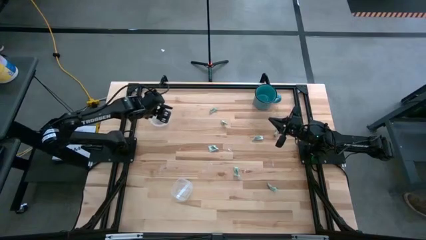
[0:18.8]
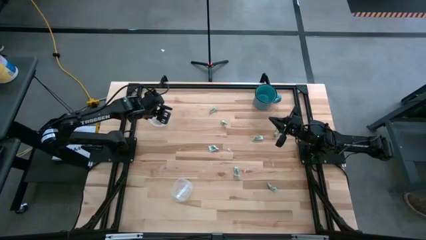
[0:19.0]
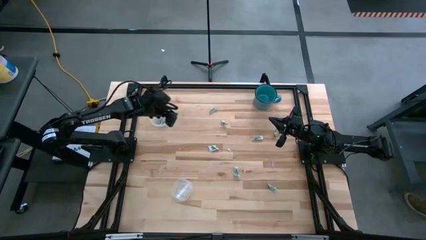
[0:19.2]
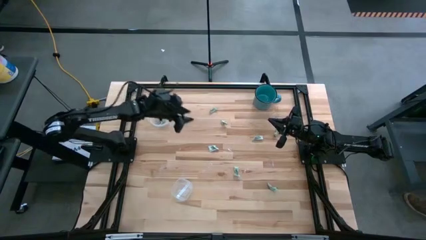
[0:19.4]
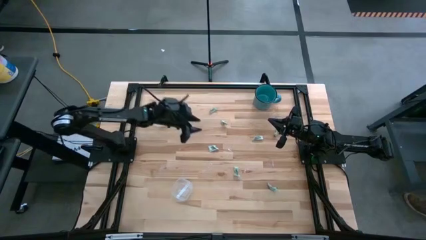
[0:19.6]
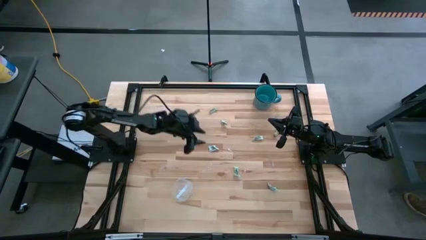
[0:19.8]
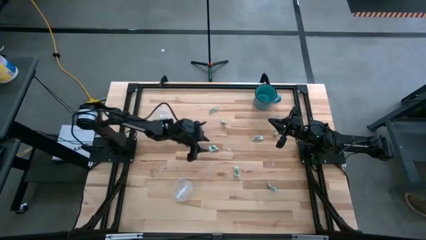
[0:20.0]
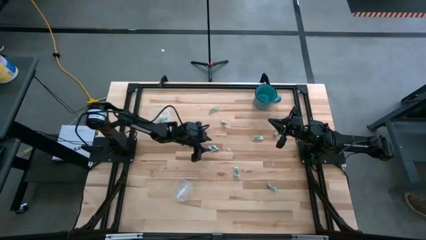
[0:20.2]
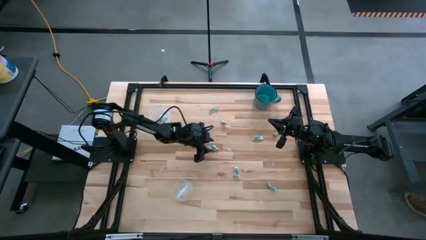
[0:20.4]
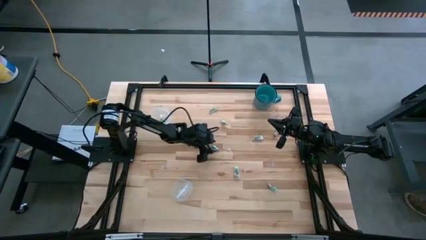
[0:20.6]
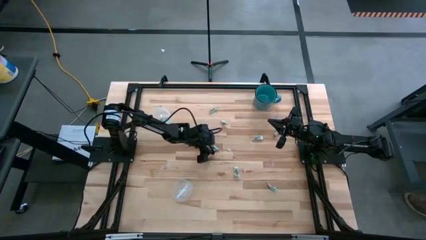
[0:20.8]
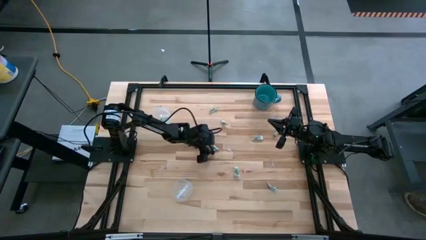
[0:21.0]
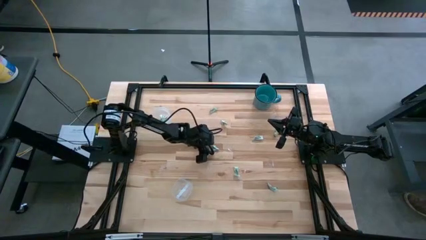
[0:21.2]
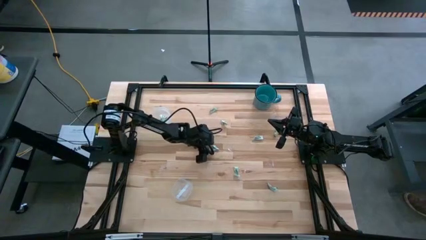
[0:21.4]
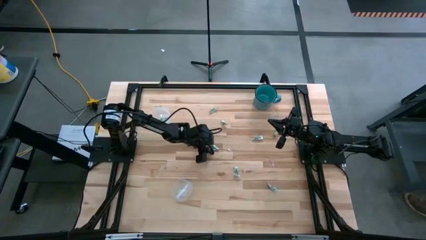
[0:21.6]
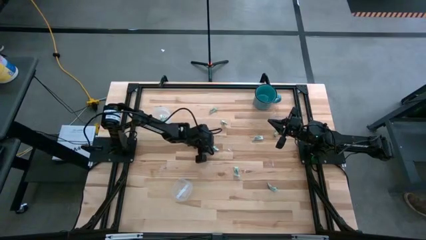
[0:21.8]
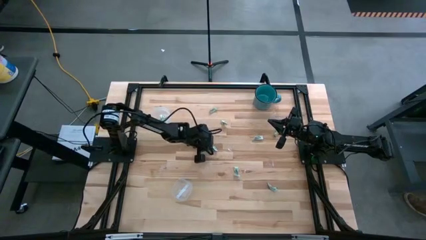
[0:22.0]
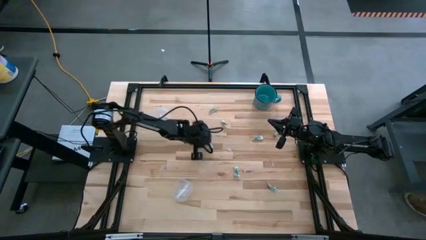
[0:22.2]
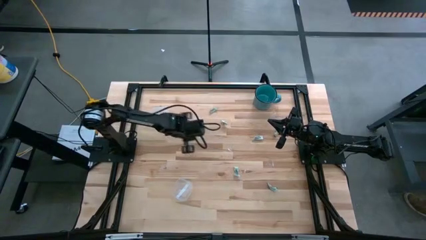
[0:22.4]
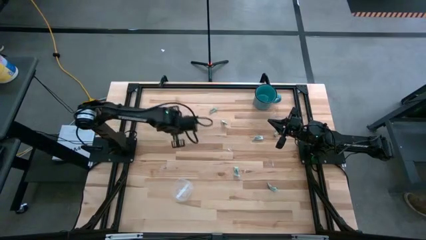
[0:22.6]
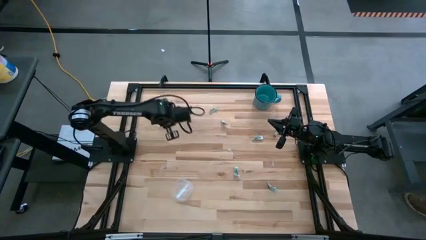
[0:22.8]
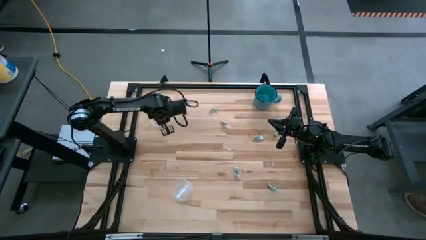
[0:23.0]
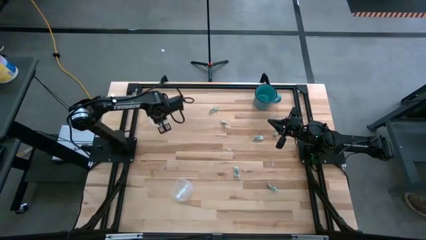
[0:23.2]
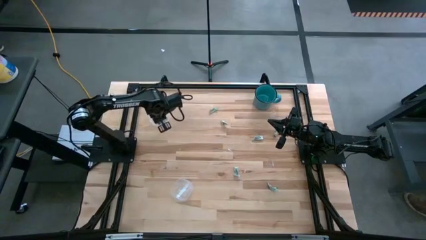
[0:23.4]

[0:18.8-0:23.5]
Task: Pick and place Stevia / Truvia into bins
Put the stevia packet into the top transparent container

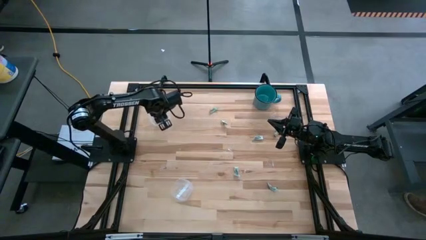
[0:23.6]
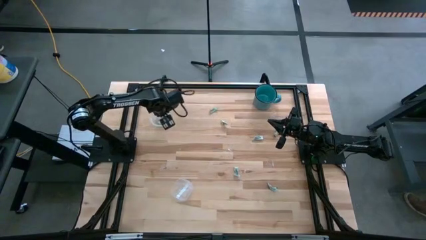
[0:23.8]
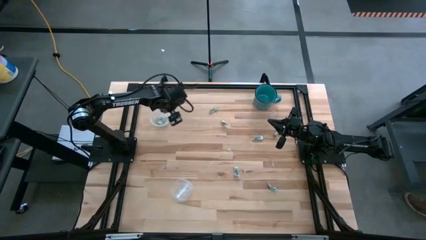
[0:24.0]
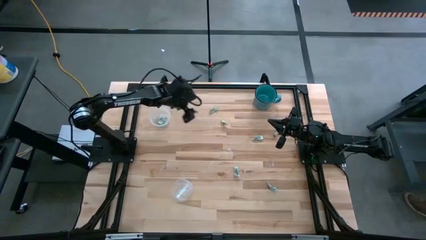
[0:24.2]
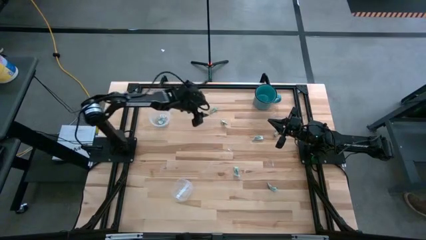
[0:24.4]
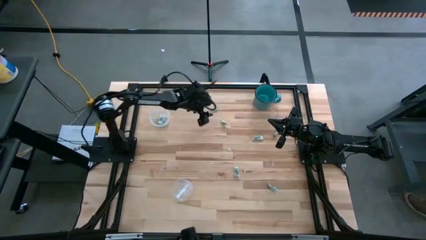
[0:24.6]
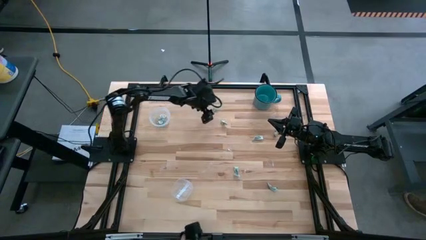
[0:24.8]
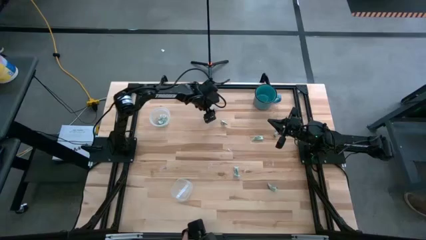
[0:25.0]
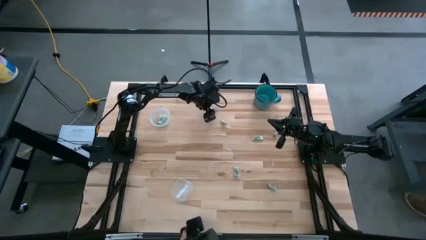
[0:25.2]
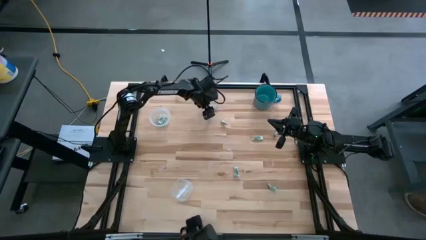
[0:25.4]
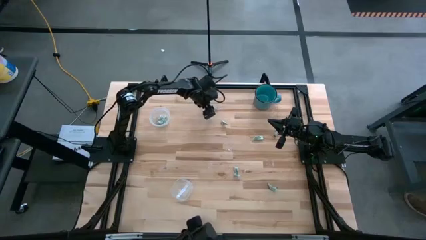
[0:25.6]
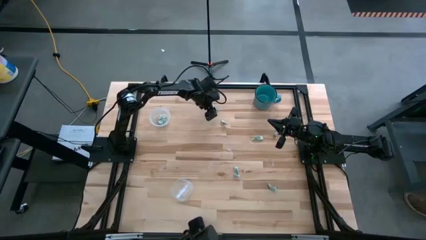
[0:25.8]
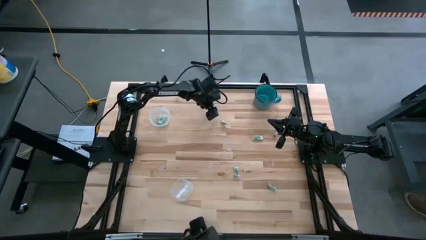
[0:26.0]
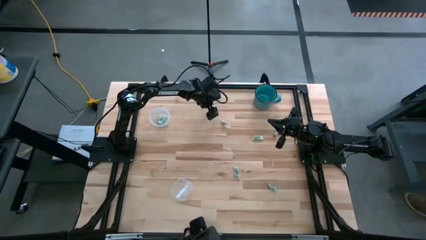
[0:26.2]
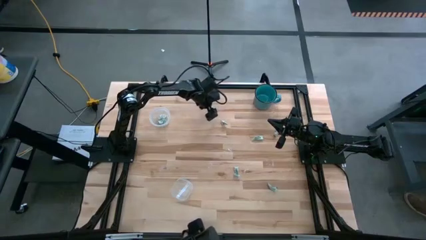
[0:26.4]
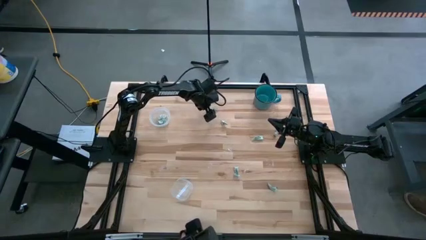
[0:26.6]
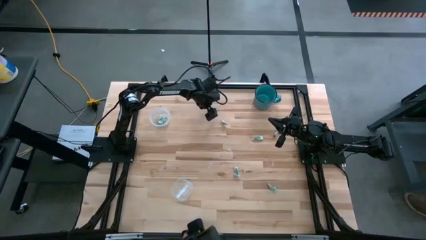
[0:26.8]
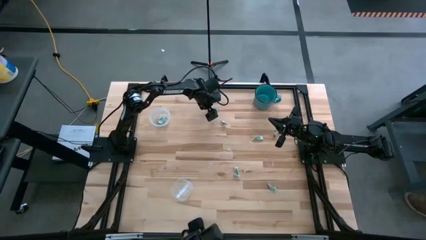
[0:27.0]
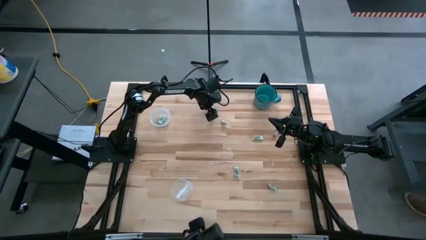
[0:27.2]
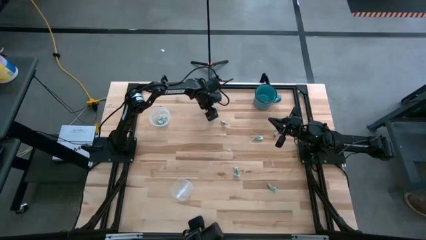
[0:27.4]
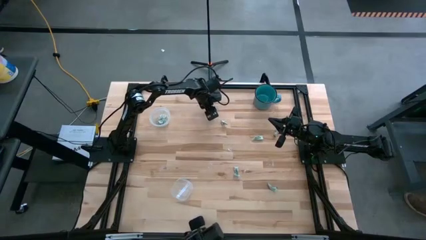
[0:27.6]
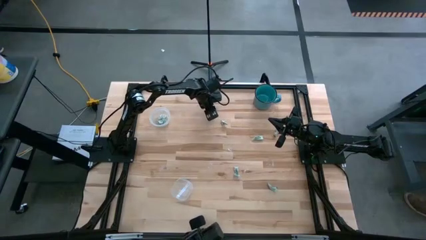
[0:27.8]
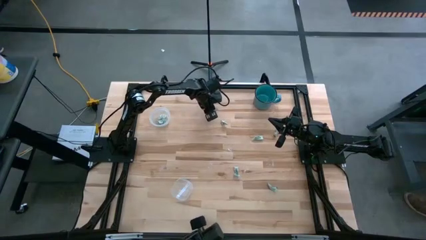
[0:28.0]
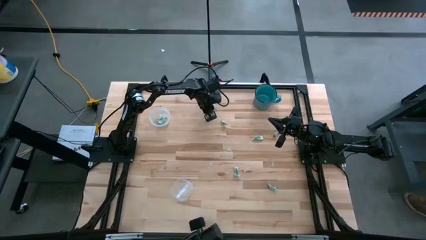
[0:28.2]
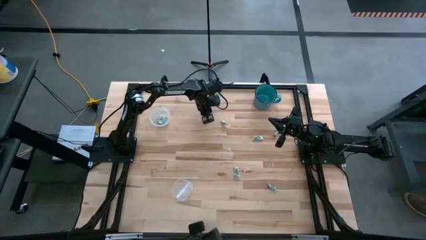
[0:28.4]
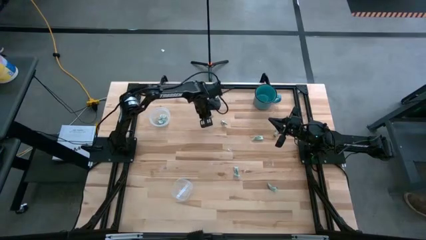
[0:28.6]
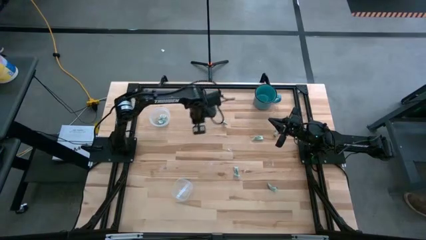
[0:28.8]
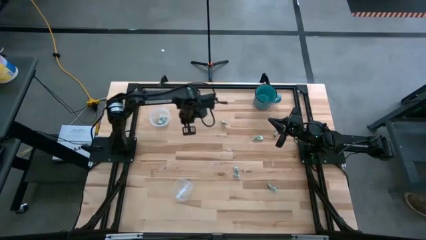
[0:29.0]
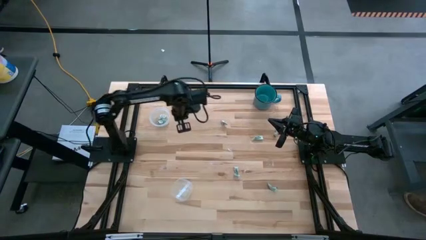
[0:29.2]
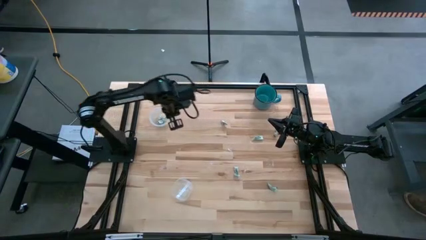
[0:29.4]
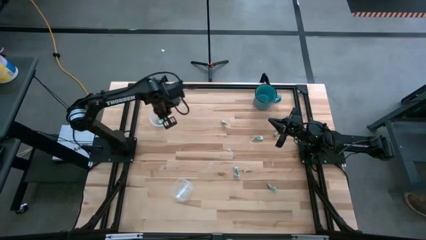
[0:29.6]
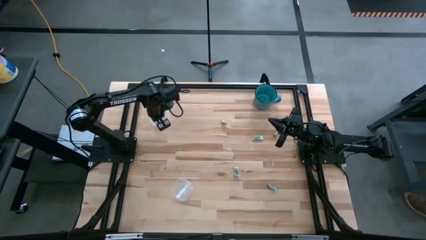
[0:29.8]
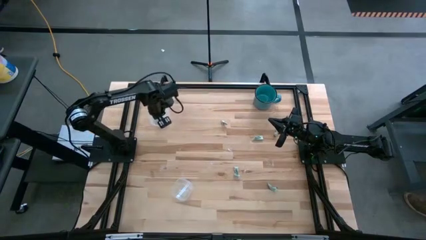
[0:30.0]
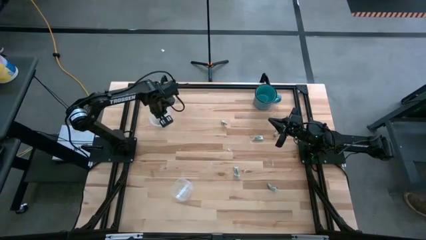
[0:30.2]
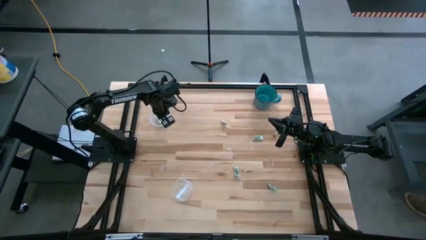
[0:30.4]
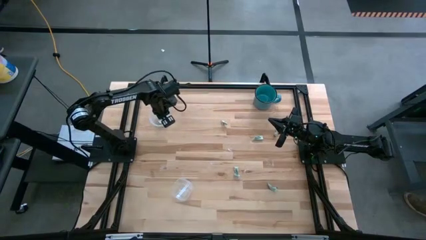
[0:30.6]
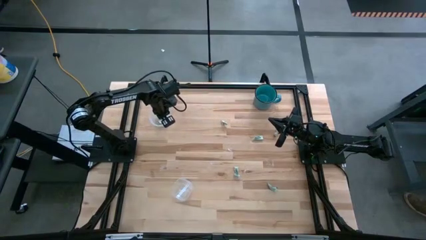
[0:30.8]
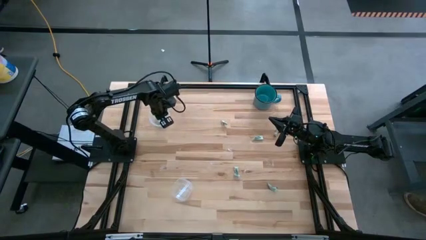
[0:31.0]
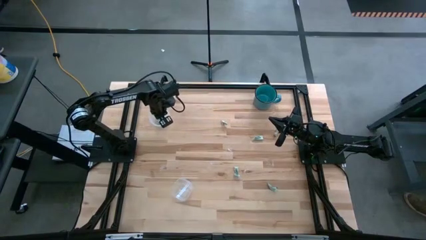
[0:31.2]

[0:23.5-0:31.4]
Put the stevia packet into the top transparent container

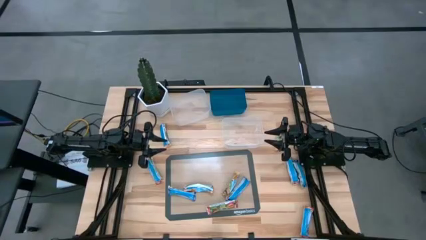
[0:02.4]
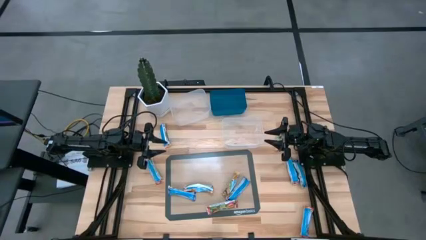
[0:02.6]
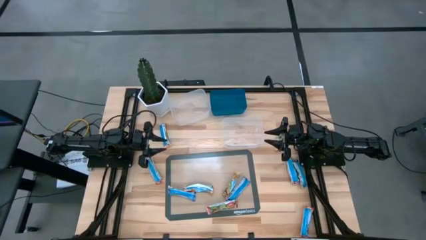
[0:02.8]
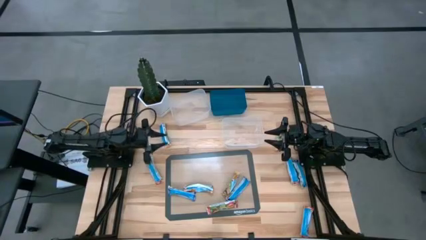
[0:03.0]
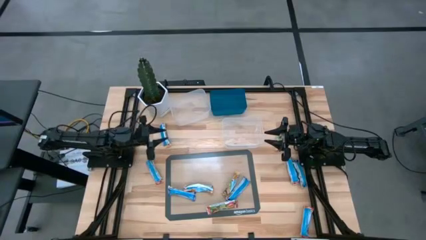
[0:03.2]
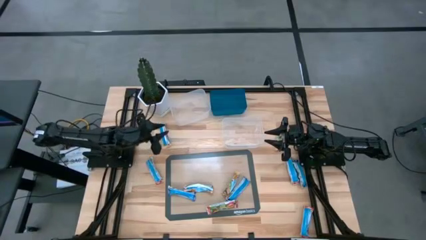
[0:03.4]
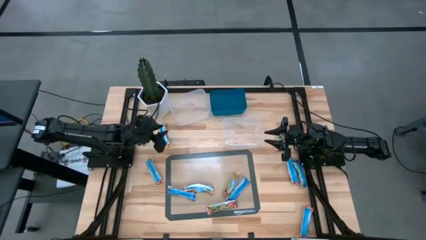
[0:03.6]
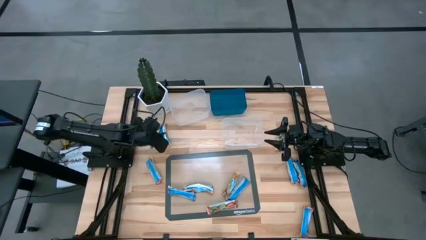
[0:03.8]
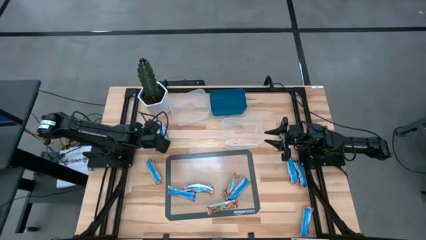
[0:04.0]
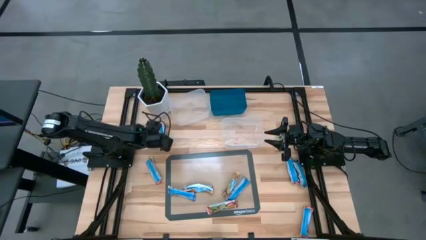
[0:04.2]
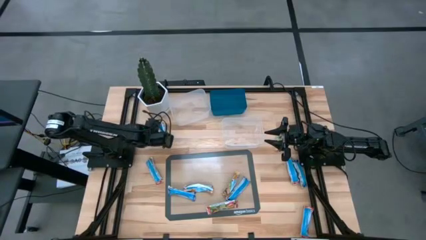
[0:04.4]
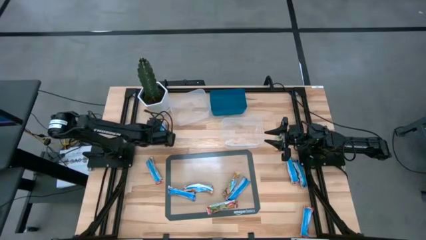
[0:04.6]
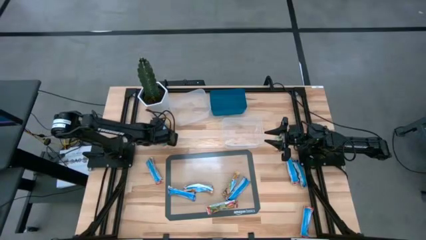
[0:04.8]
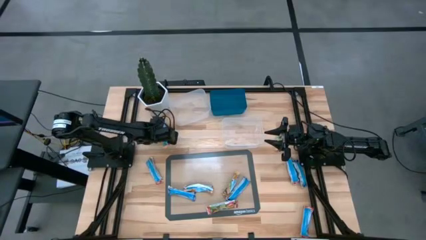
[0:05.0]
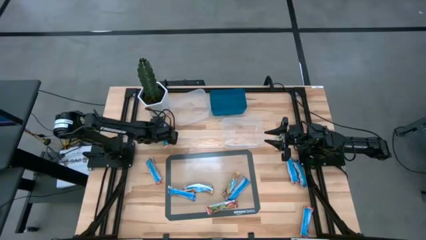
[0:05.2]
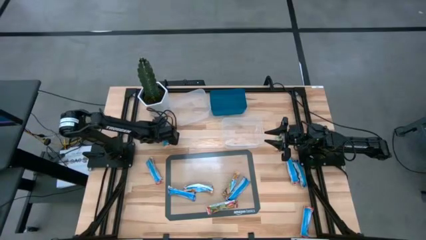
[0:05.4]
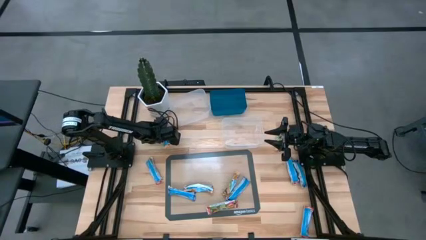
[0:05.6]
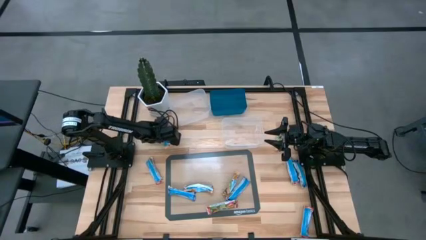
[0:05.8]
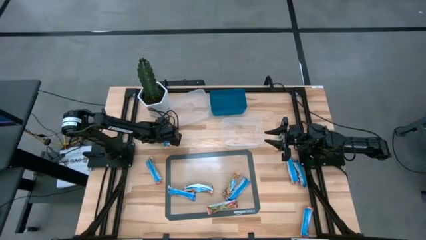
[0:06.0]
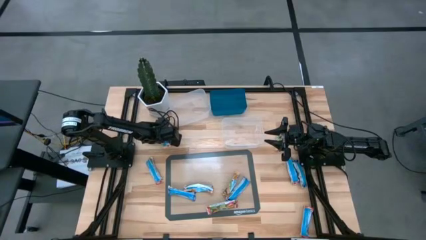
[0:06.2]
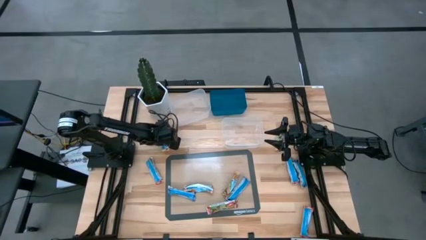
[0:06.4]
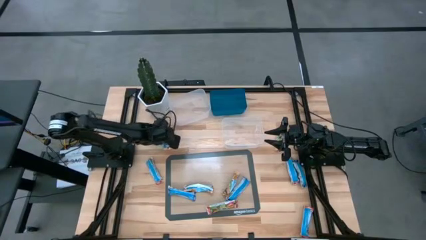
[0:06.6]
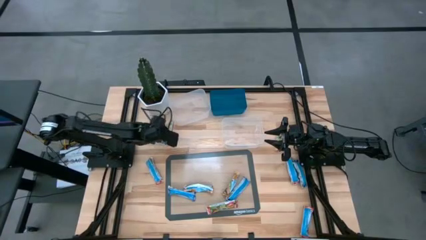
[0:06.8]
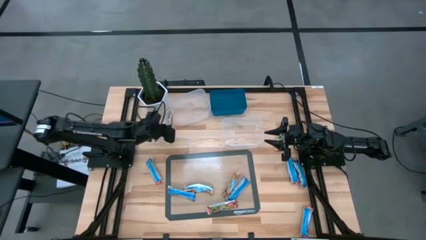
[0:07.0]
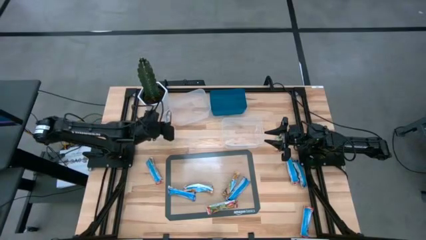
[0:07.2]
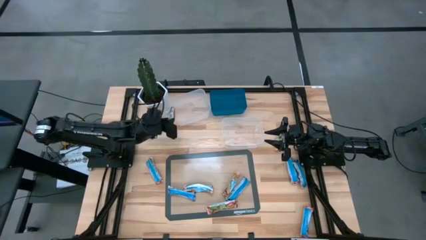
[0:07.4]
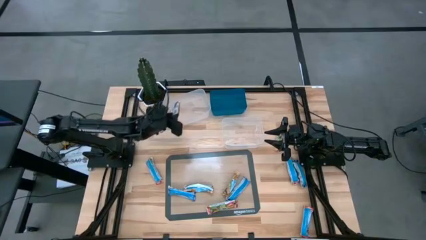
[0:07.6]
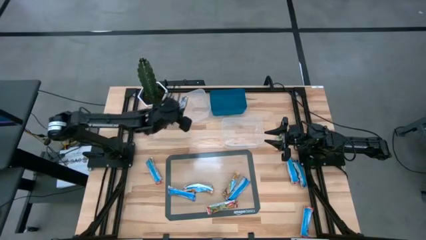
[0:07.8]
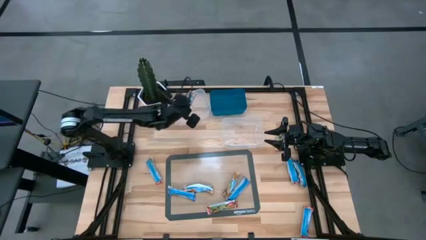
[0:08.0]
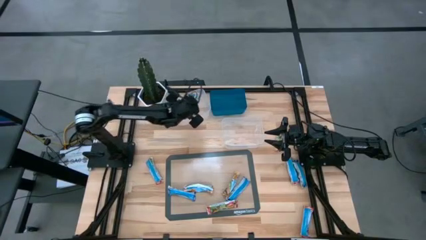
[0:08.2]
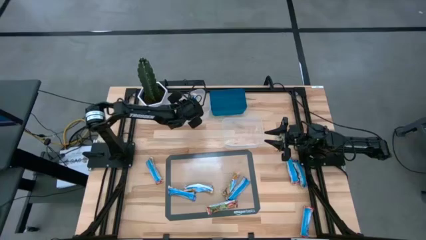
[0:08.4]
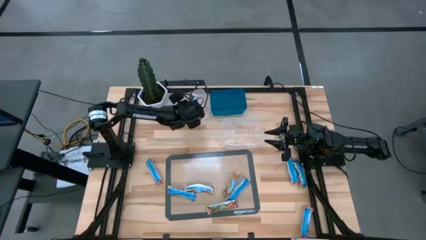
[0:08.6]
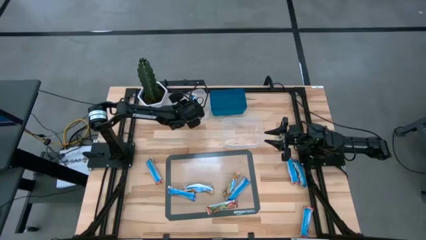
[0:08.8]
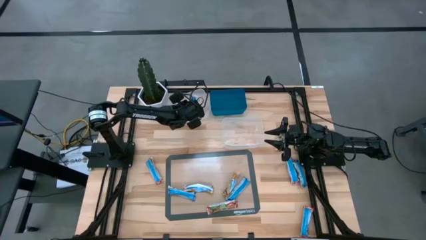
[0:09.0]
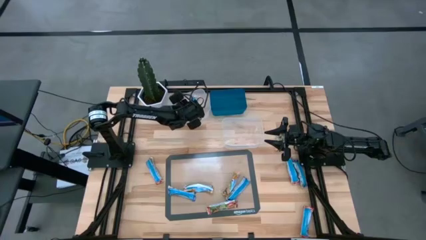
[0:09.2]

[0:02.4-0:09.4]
Task: Pick and place Granola Bars by type
Put the yellow granola bar into the top transparent bin
